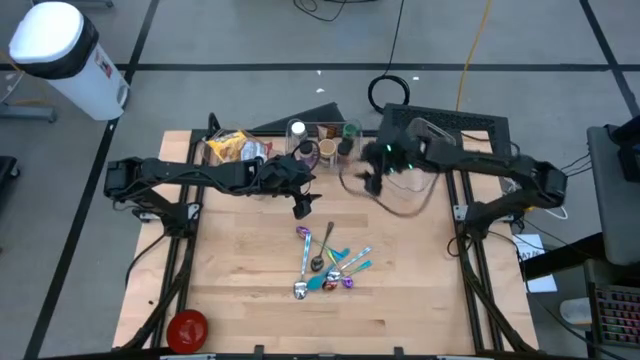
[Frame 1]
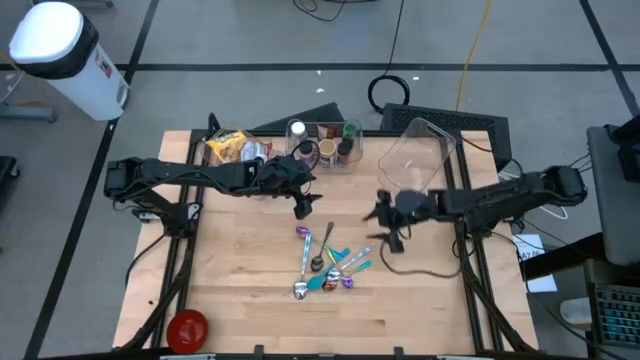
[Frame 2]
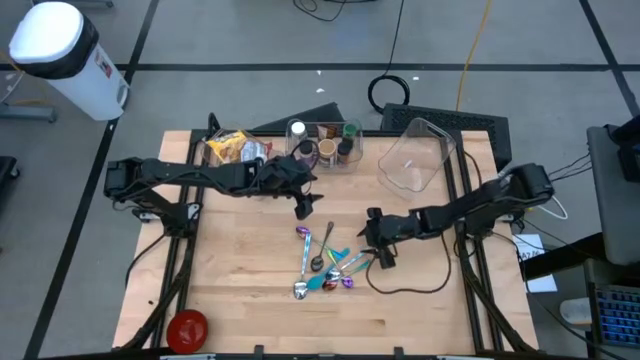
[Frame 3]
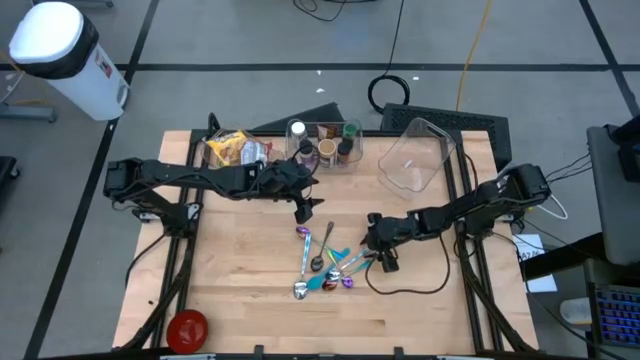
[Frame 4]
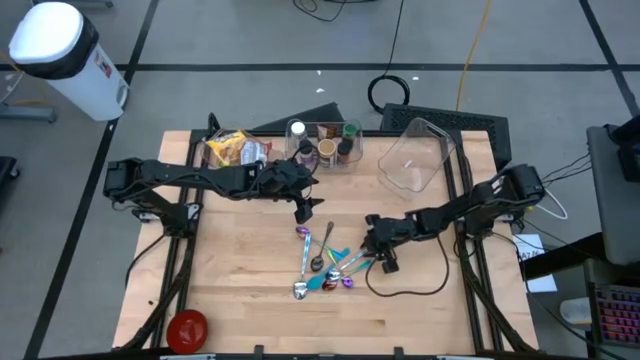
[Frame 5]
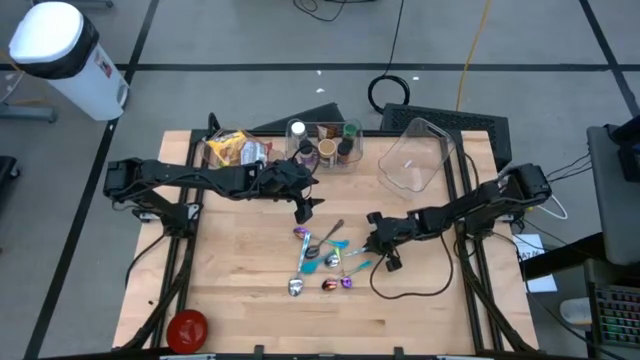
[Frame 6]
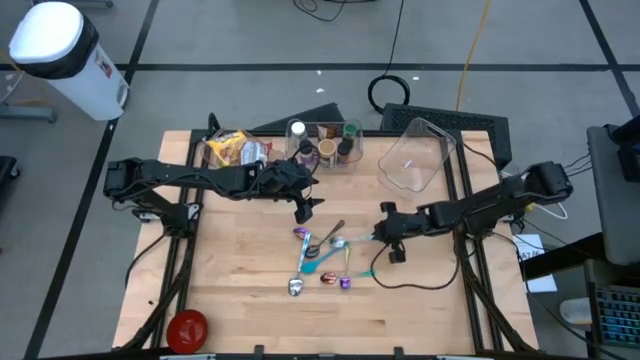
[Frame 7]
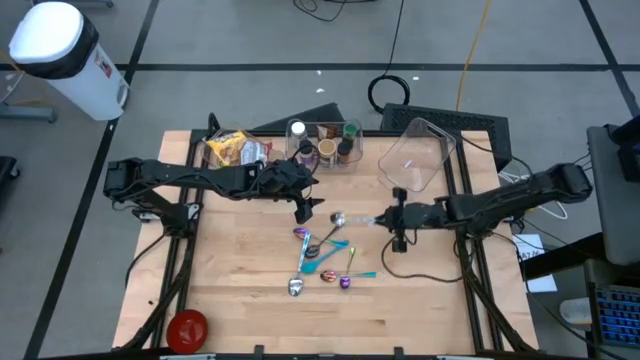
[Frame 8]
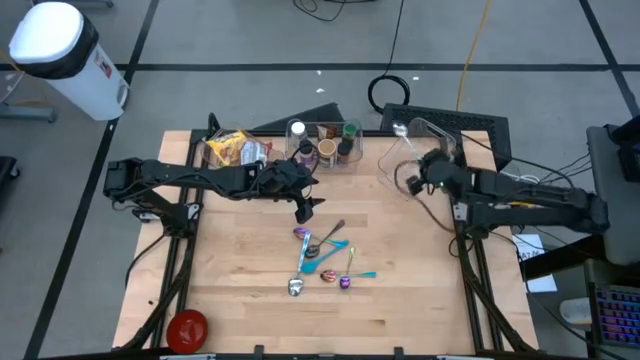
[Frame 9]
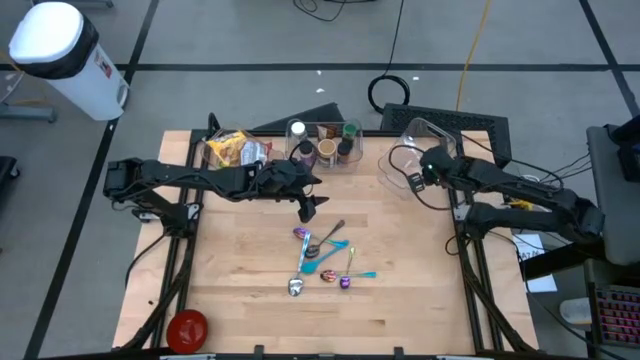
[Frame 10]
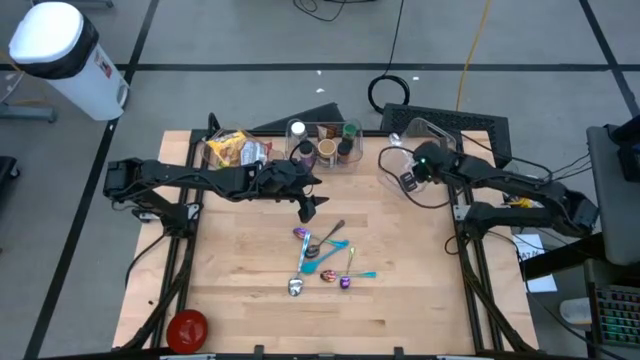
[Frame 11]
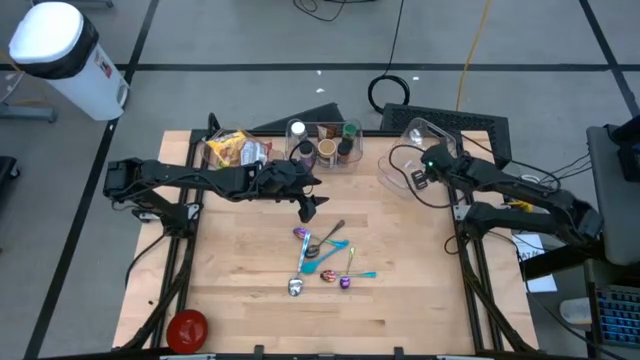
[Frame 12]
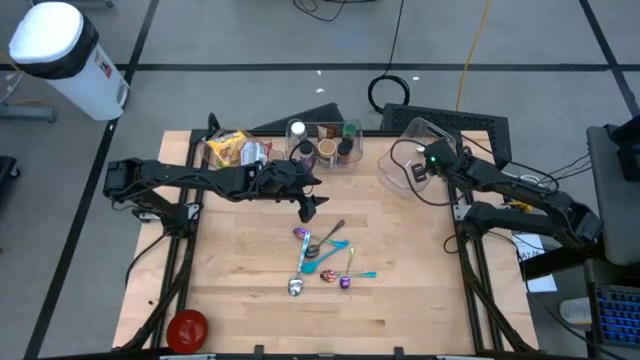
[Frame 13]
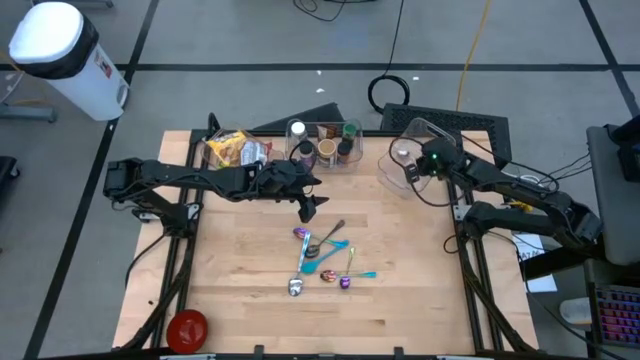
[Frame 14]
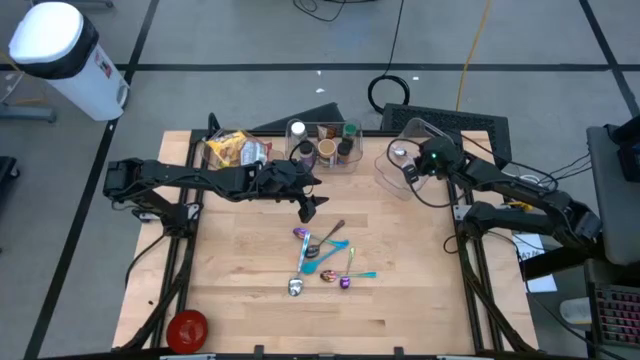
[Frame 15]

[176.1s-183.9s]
Task: Pick & Place Food Item
Put the right white patterned spoon into the right transparent bin

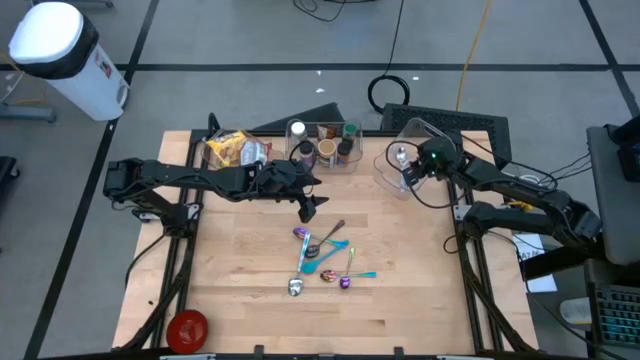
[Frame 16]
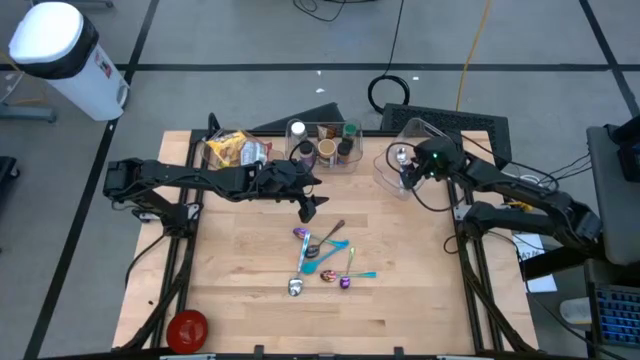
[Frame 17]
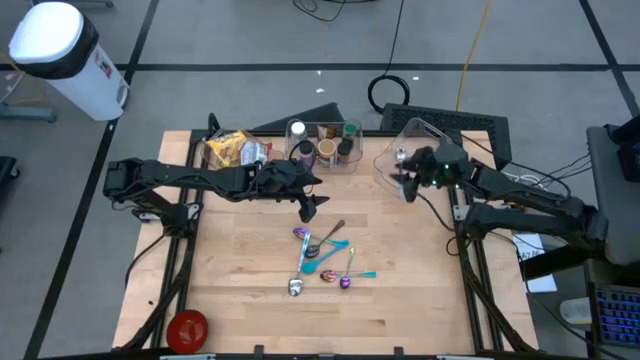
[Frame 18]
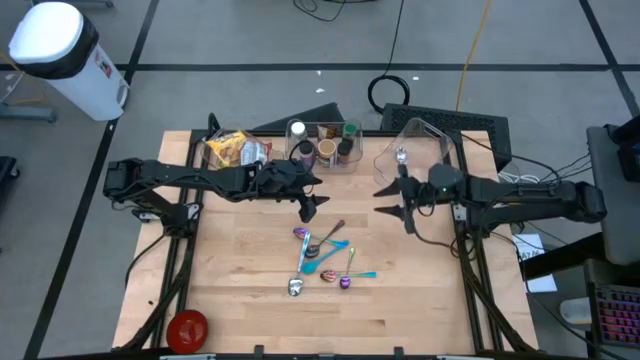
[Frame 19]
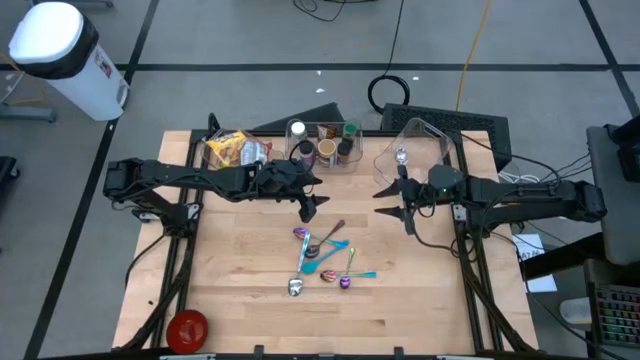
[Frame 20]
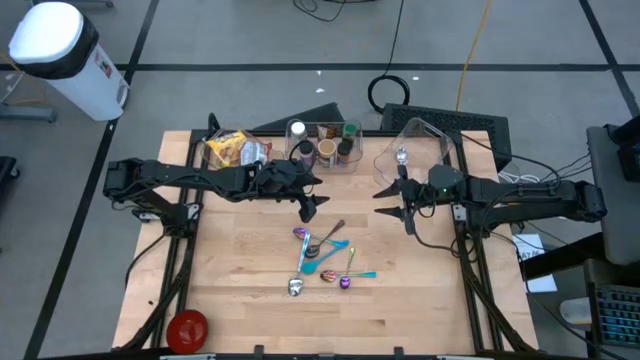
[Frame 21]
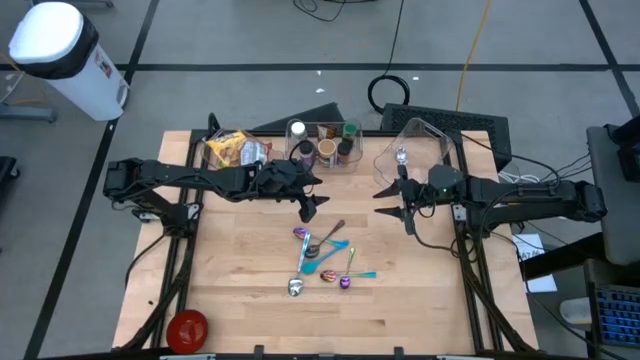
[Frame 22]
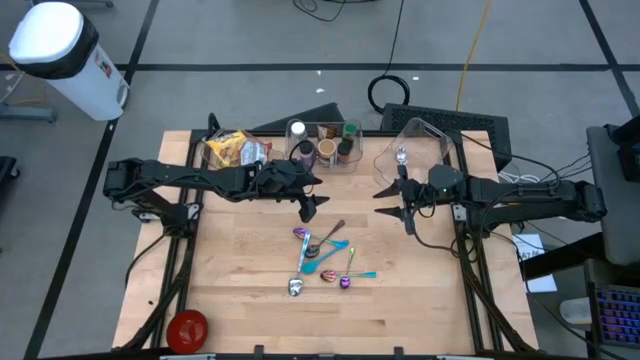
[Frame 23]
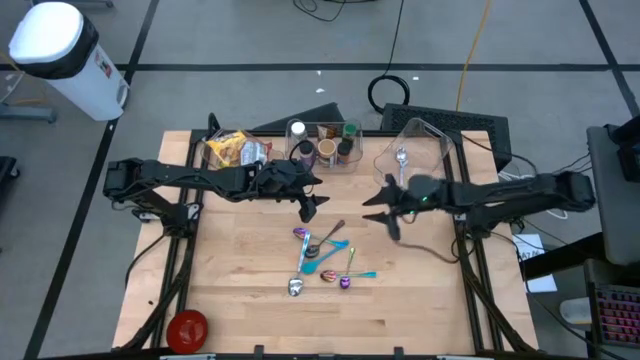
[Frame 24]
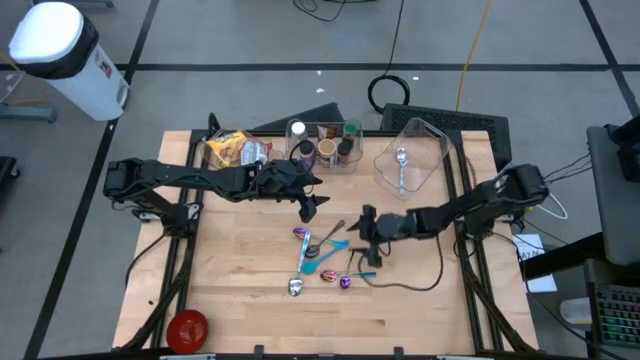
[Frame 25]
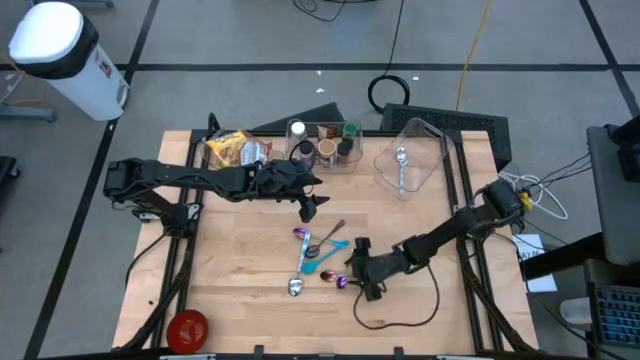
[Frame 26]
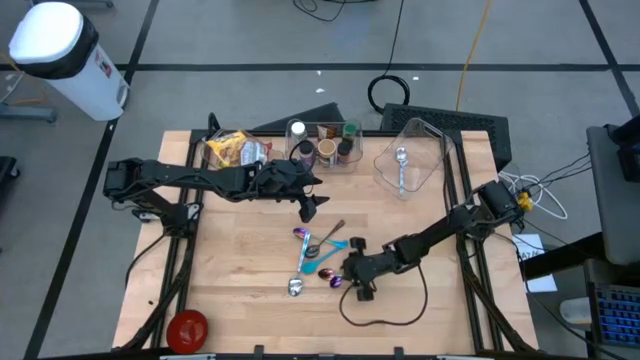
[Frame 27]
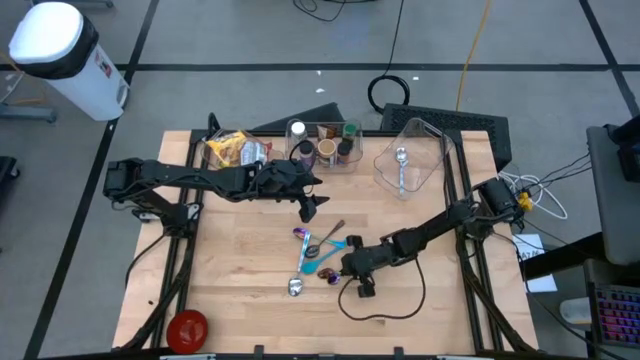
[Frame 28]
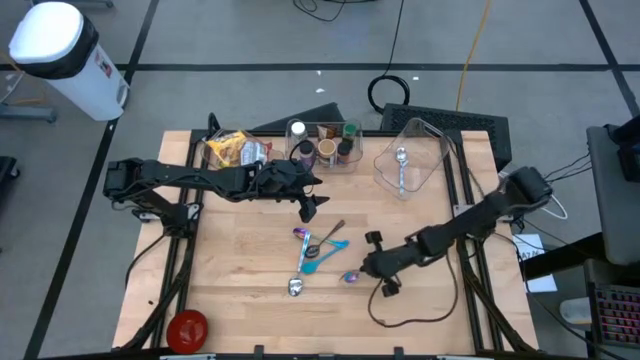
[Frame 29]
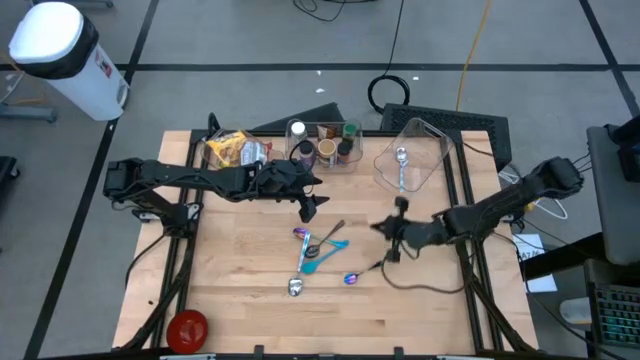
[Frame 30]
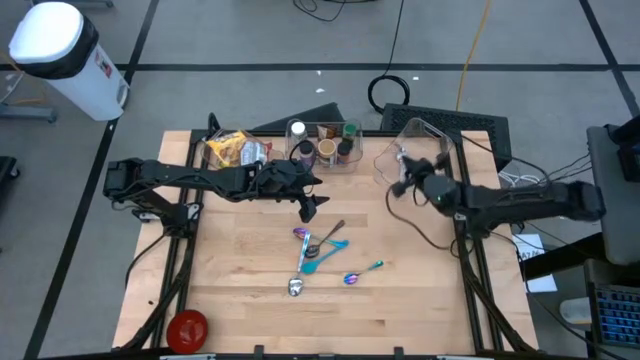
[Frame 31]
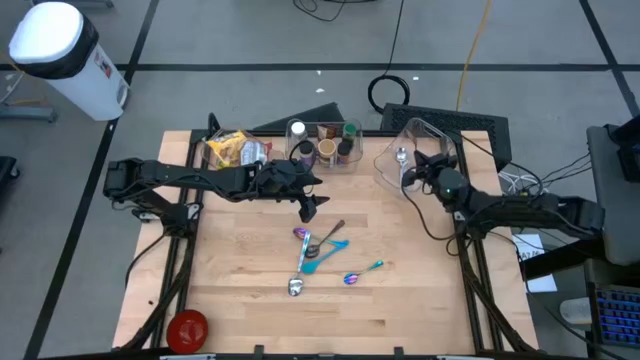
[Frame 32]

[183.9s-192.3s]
Put the middle violet spoon into the right transparent bin

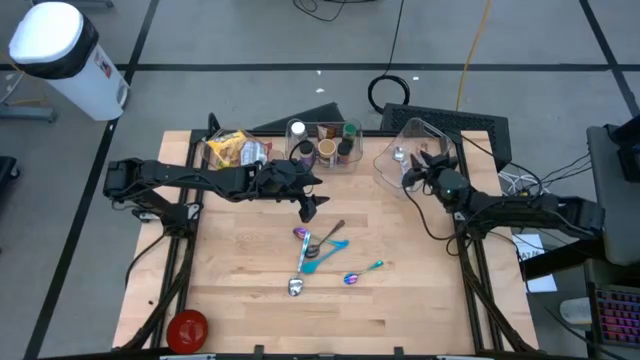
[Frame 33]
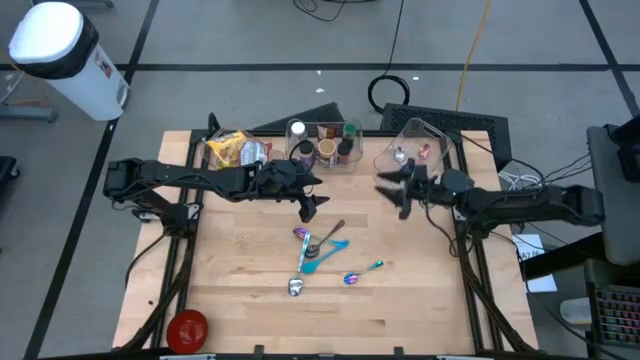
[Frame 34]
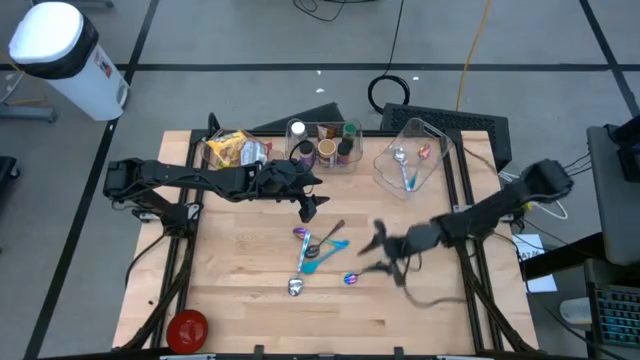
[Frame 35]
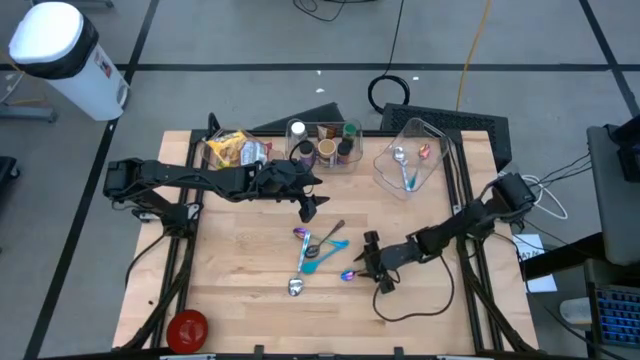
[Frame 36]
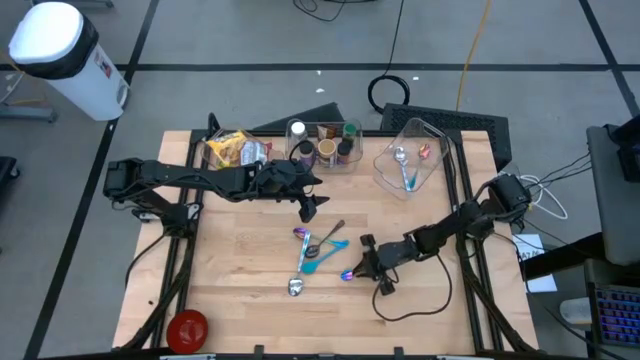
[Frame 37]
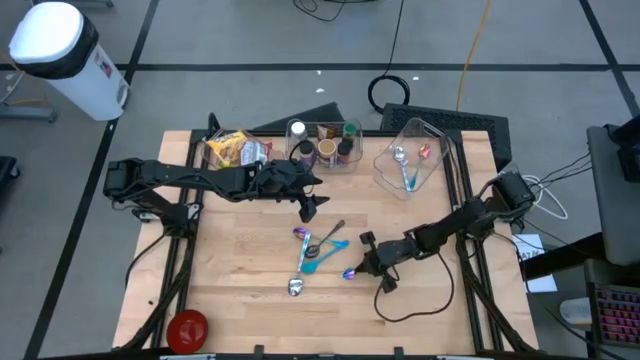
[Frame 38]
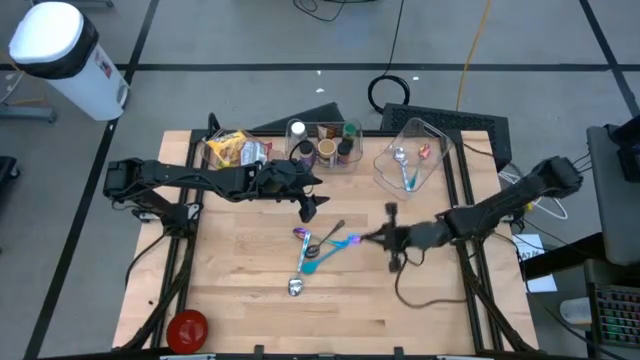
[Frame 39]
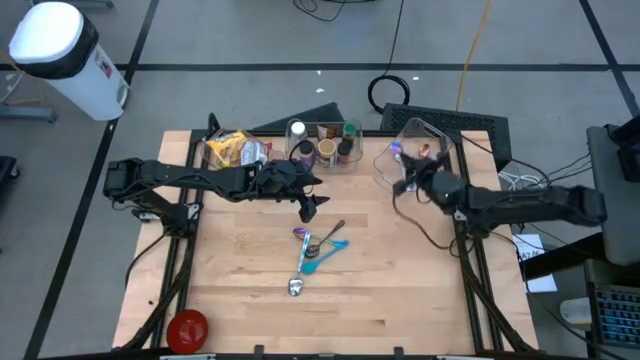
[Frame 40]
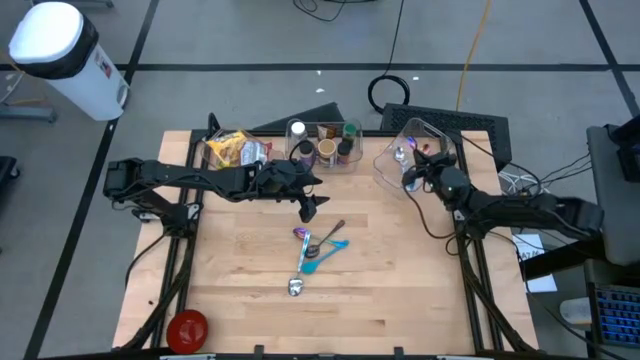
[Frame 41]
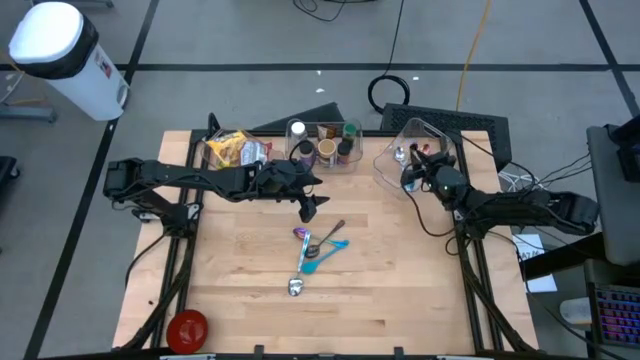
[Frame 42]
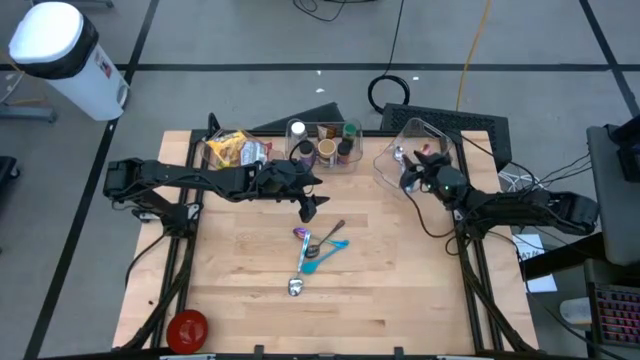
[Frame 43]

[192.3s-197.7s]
Put the bottom violet spoon into the right transparent bin
